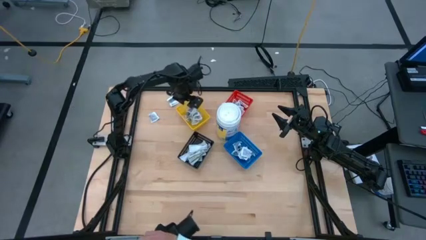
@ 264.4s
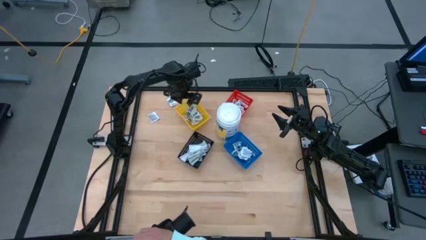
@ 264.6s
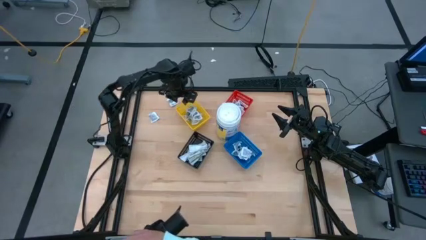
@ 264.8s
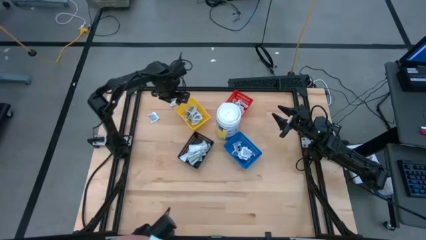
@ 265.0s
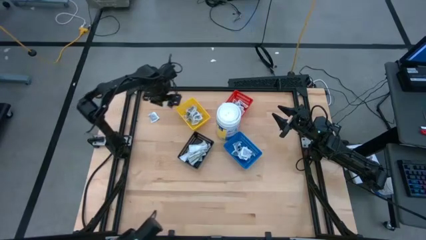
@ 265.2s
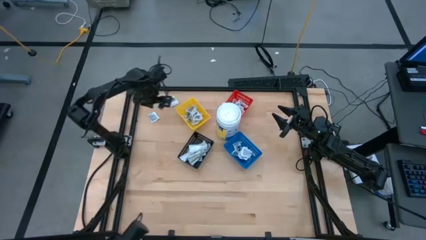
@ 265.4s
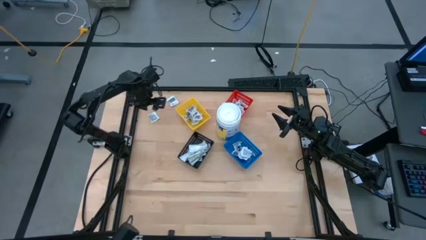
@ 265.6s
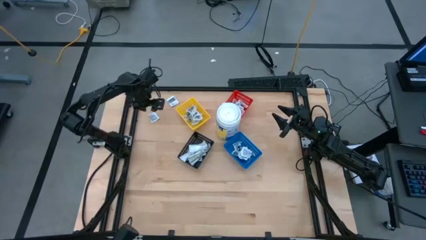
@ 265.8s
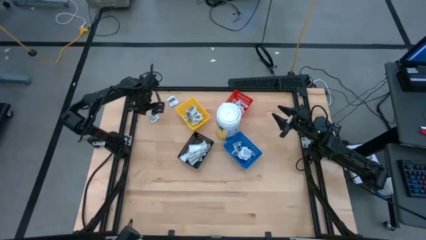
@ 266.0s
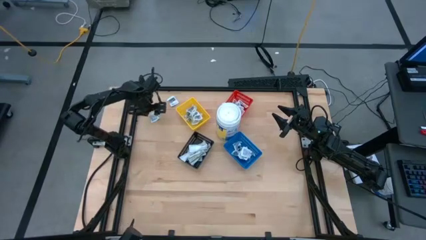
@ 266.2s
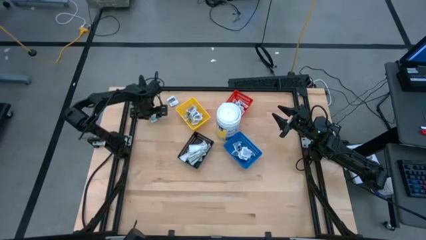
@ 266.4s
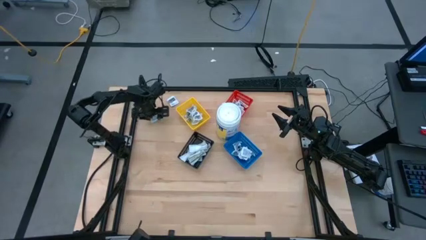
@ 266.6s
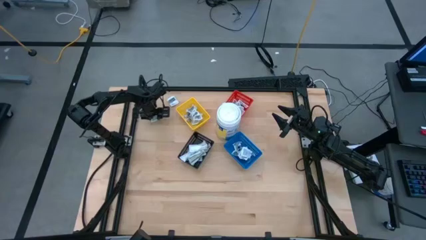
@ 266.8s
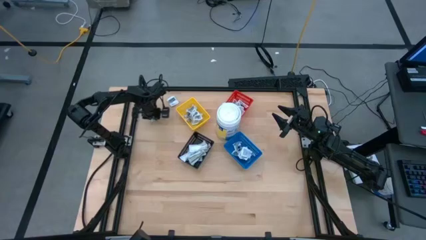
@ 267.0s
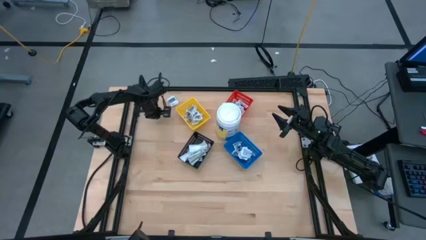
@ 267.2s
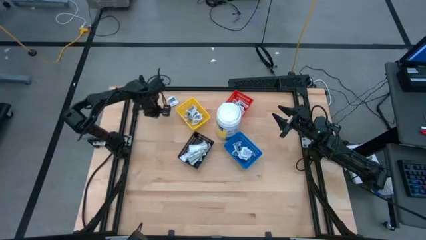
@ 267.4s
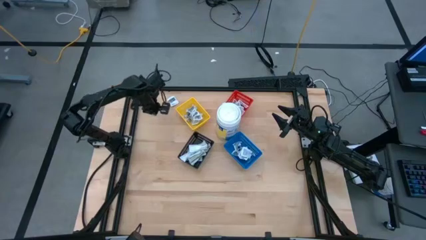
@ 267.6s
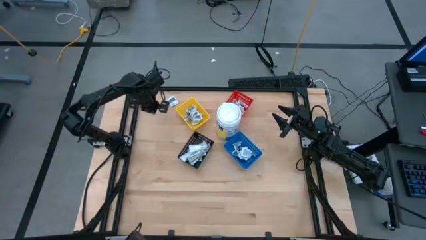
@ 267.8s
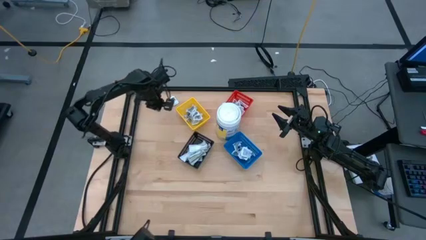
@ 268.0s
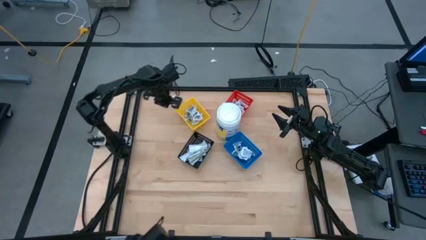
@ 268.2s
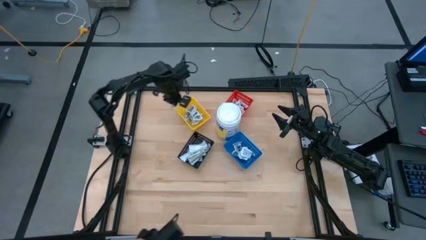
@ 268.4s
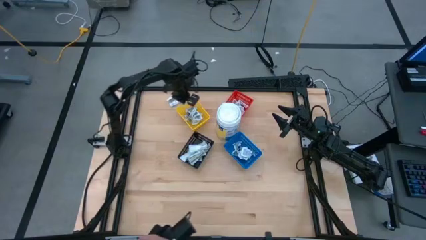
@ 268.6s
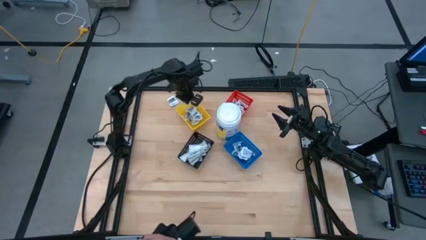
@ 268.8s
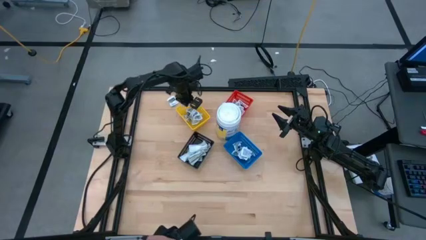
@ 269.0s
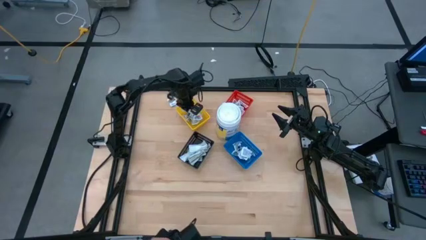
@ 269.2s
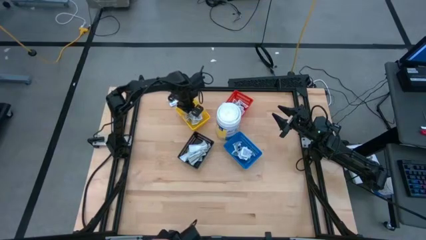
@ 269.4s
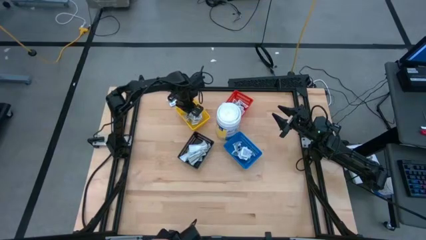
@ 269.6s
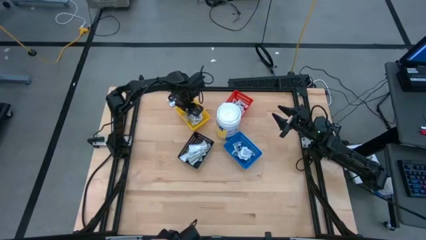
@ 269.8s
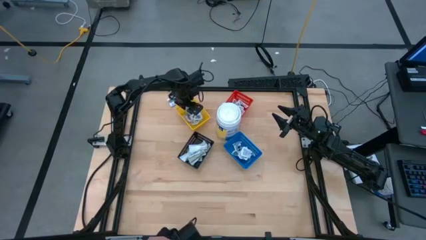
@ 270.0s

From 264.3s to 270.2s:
Task: Pick & Place First Aid Supplies
Put the towelette pack into the yellow bin

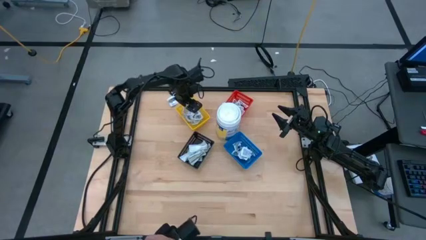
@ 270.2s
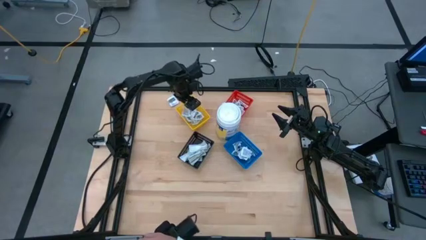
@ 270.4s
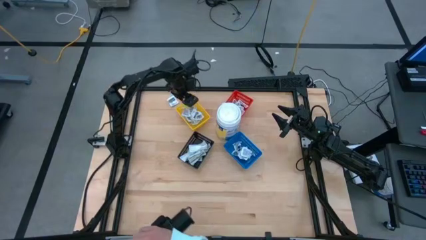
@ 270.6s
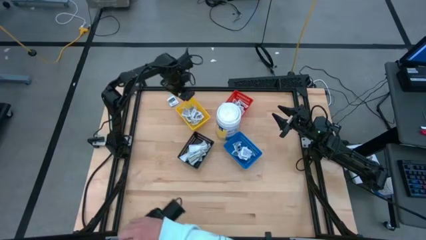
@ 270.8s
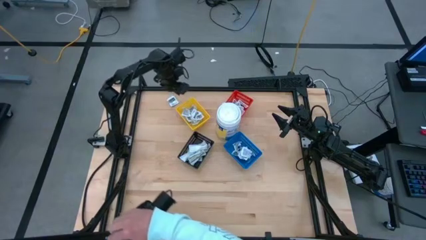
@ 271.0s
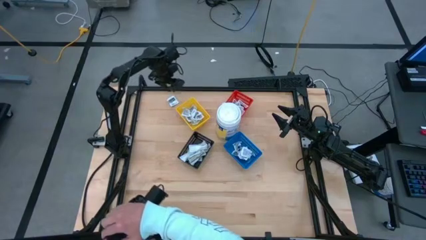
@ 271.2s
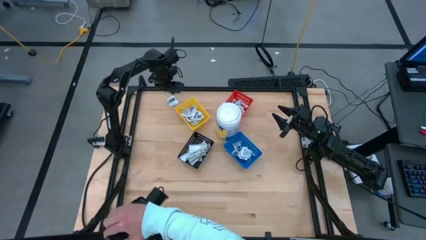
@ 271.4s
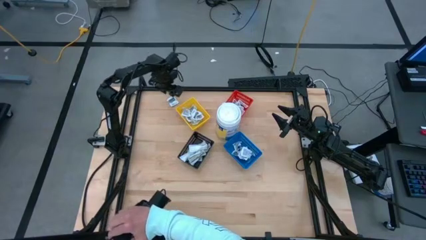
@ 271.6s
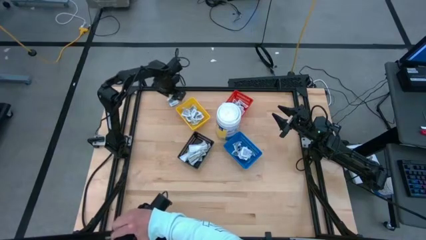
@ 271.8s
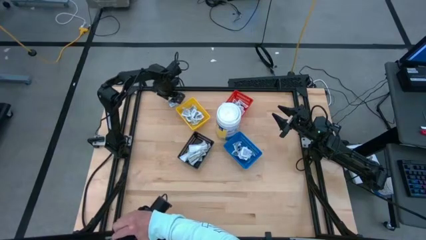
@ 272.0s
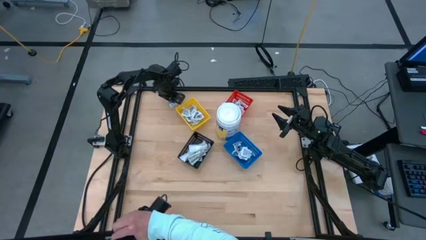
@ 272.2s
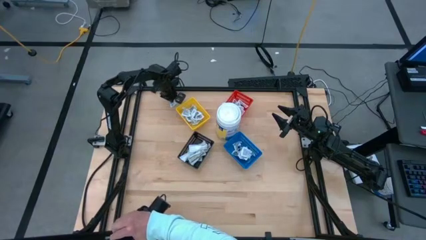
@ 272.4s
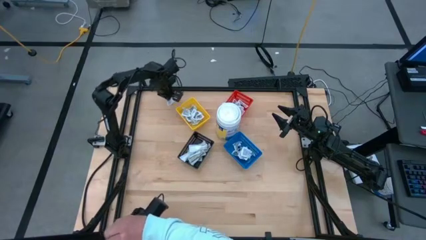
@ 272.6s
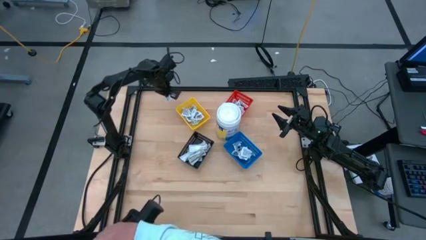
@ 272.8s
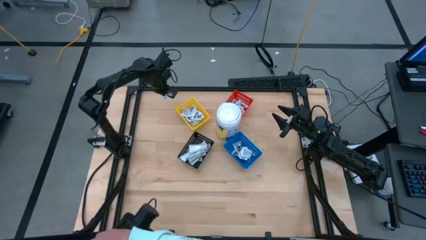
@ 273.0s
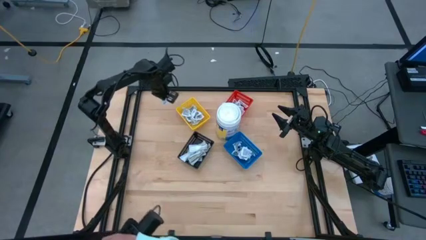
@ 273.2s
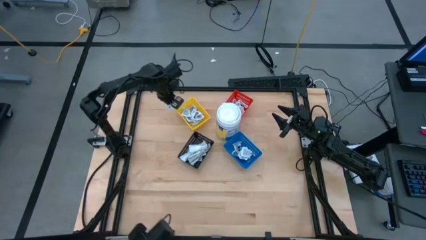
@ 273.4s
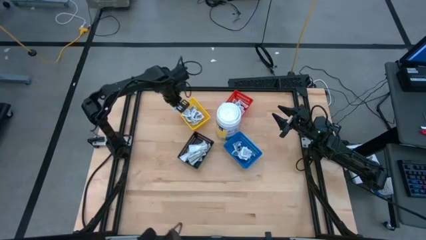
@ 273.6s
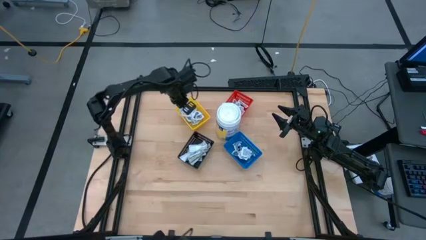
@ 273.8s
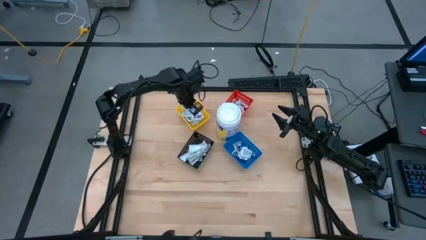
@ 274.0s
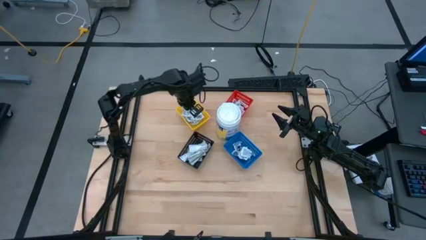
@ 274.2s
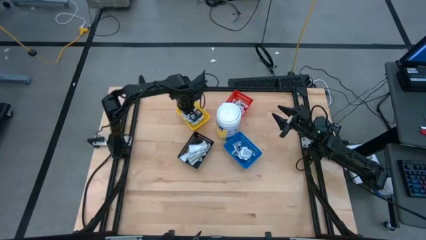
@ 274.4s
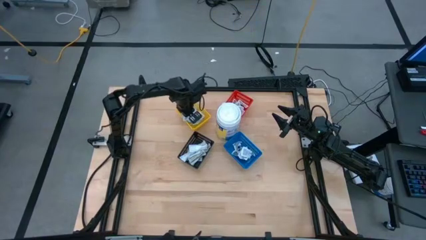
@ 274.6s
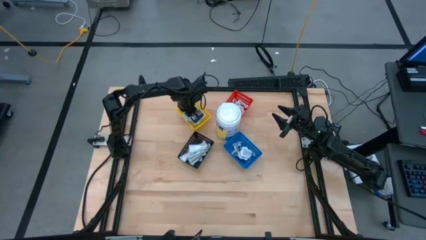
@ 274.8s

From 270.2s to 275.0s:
Put the towelette pack into the yellow bin

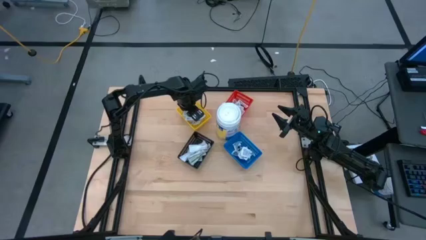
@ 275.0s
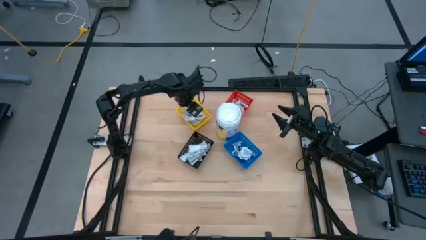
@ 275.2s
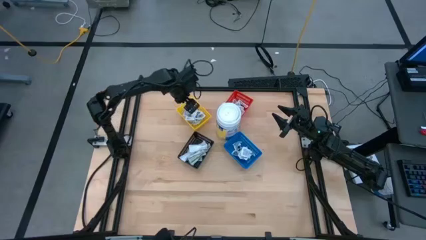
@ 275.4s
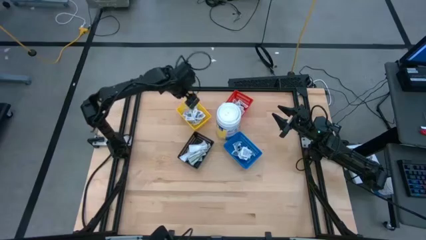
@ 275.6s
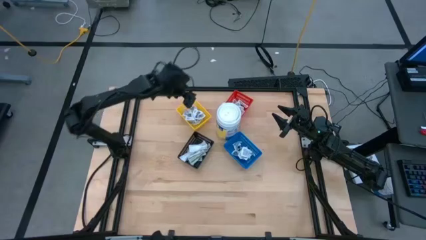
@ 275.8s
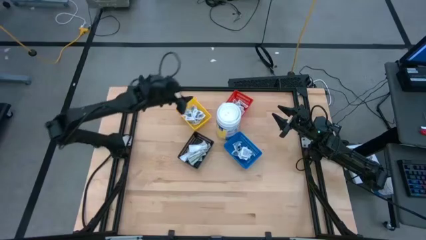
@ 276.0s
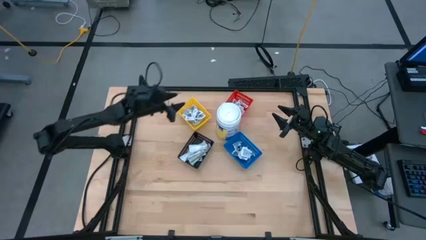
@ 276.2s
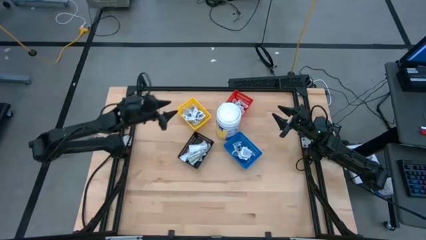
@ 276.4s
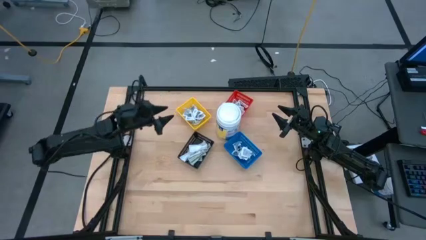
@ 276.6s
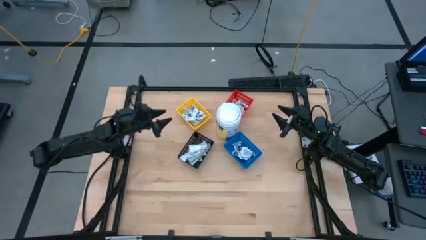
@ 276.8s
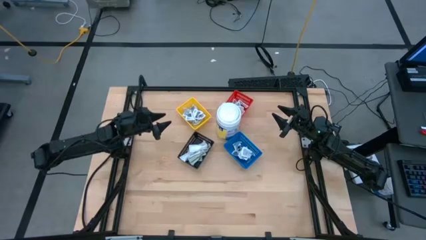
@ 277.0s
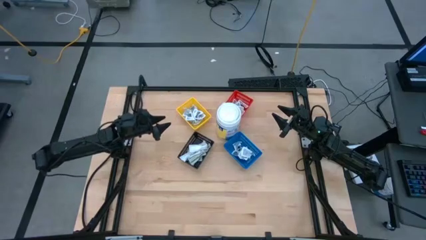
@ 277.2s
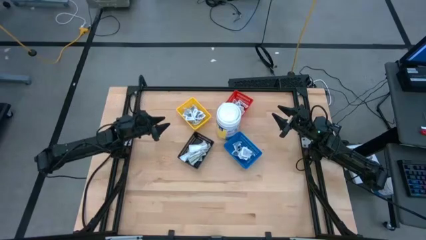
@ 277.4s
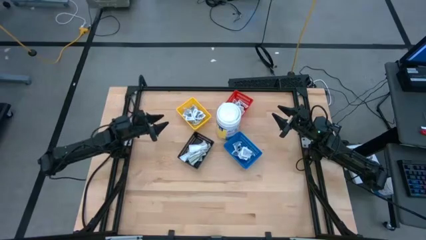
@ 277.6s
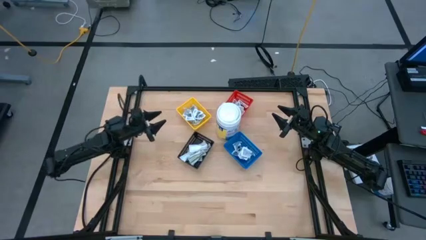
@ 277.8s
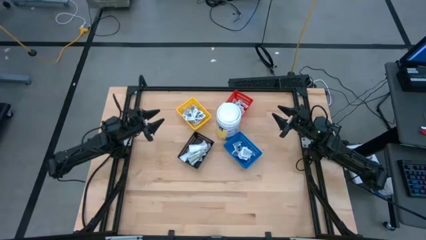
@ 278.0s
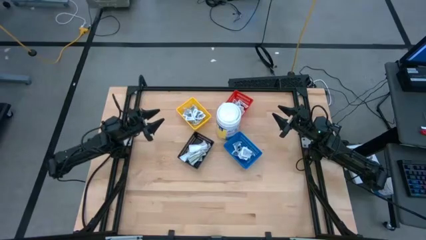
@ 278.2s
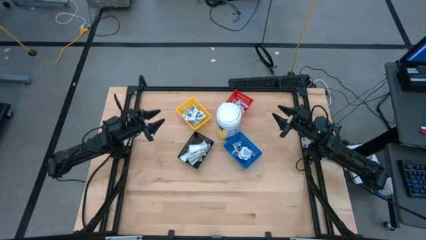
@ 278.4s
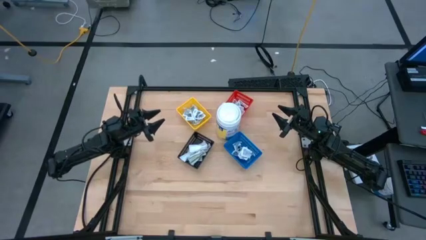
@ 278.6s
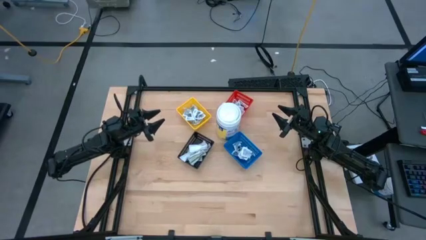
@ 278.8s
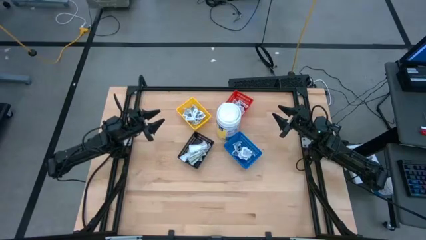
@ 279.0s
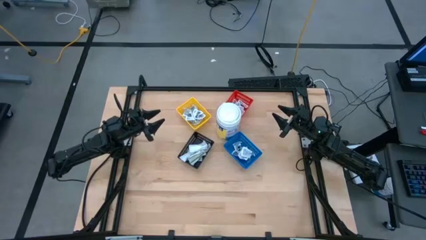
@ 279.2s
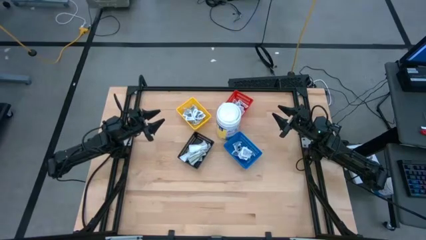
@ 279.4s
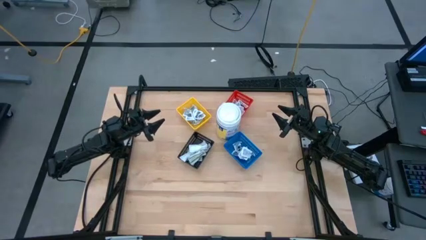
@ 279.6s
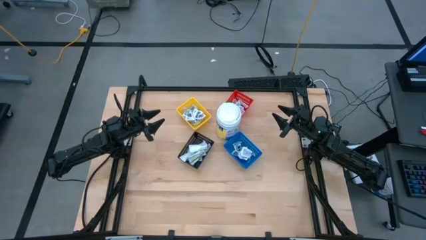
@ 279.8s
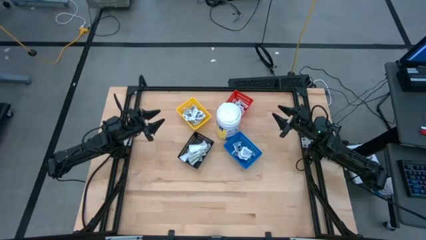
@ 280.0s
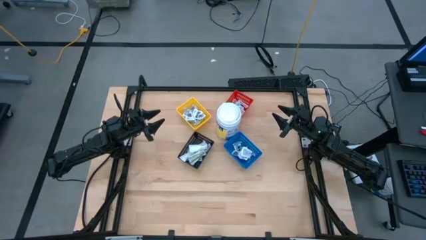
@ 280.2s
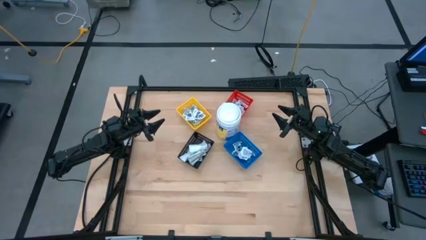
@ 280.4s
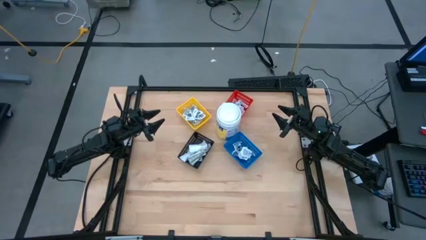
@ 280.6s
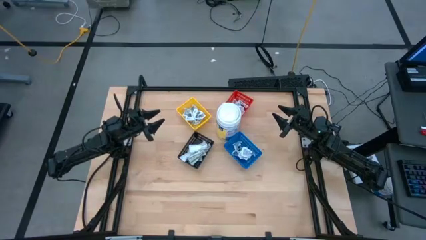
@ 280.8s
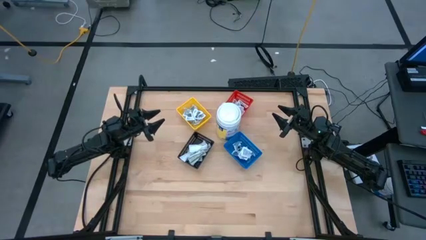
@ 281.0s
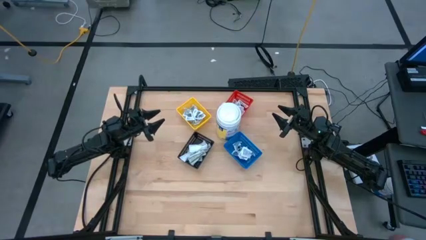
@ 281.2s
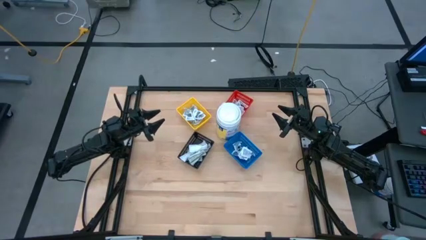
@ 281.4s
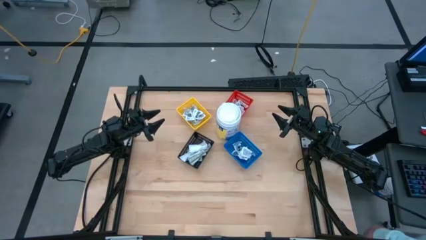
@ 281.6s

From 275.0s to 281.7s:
Return to Home Position
